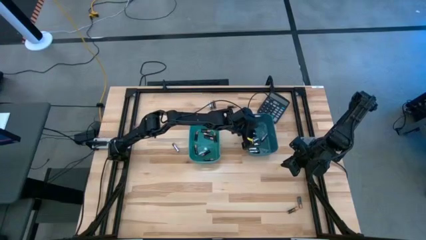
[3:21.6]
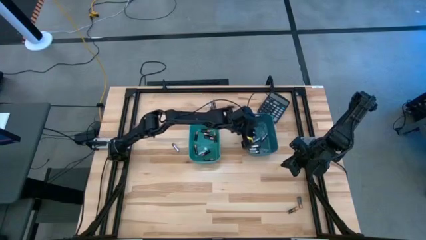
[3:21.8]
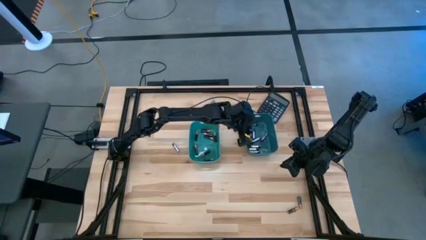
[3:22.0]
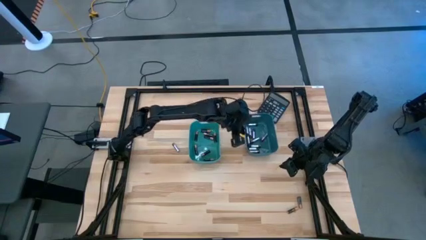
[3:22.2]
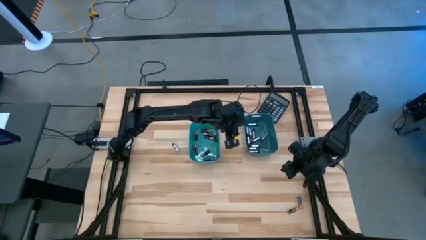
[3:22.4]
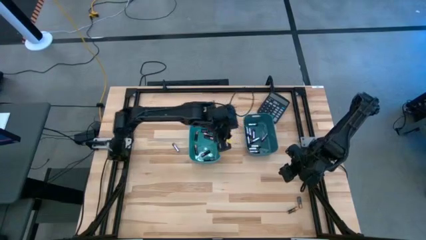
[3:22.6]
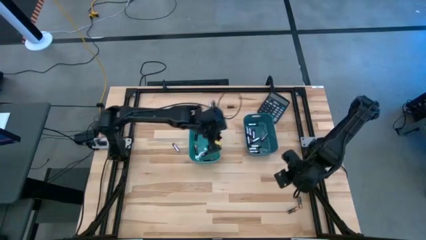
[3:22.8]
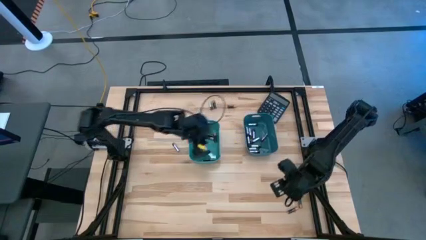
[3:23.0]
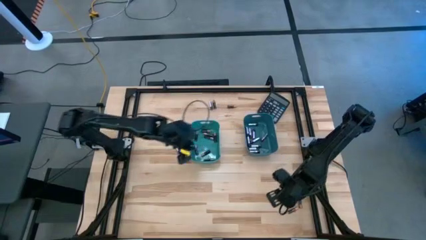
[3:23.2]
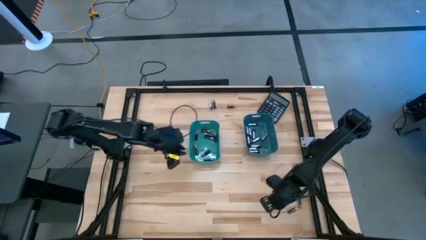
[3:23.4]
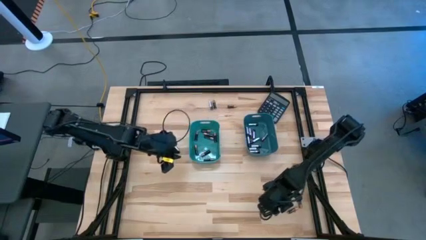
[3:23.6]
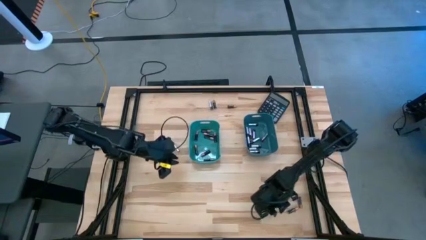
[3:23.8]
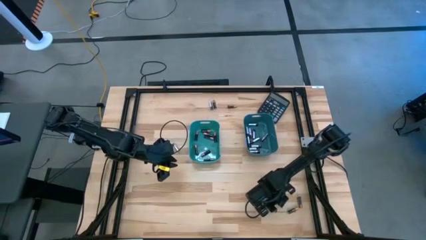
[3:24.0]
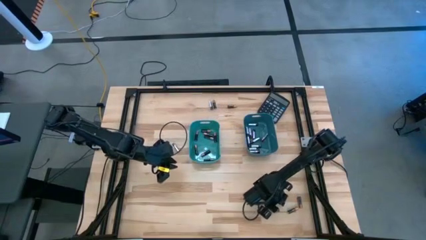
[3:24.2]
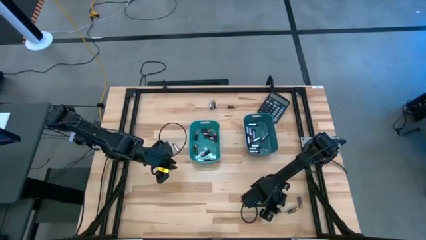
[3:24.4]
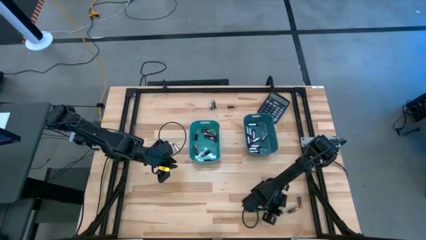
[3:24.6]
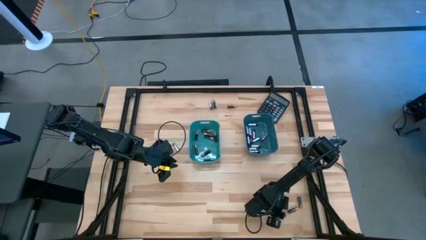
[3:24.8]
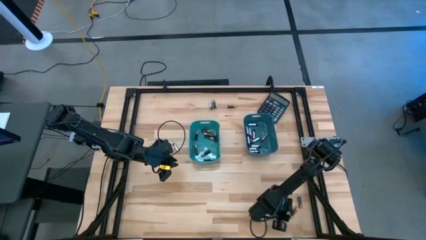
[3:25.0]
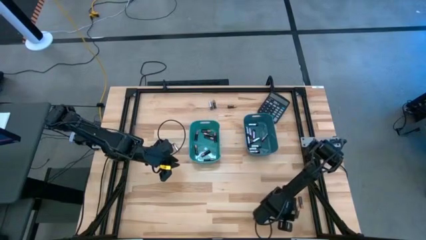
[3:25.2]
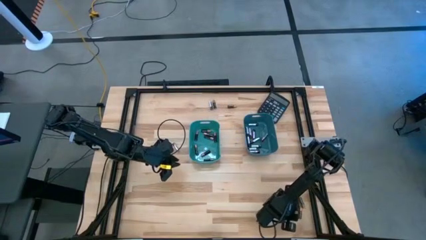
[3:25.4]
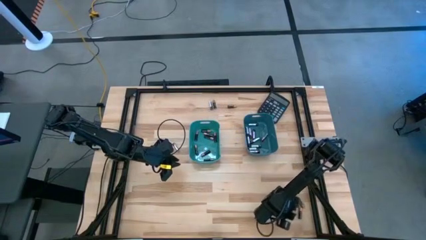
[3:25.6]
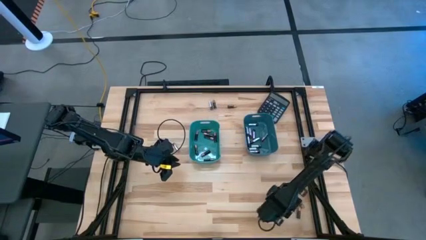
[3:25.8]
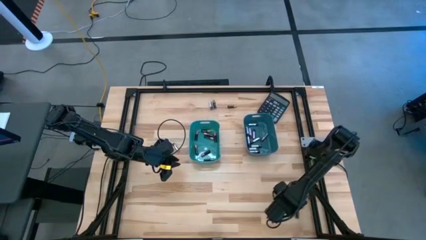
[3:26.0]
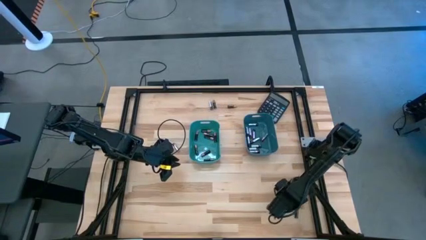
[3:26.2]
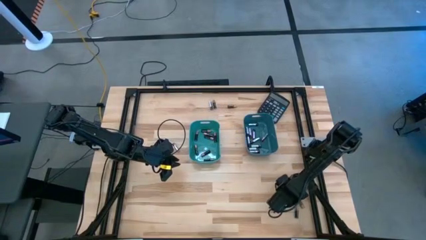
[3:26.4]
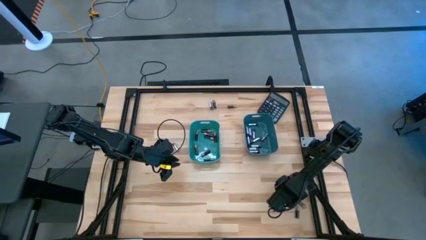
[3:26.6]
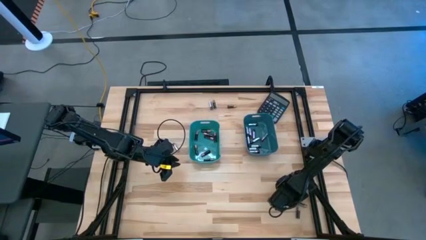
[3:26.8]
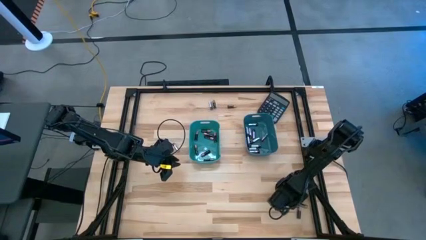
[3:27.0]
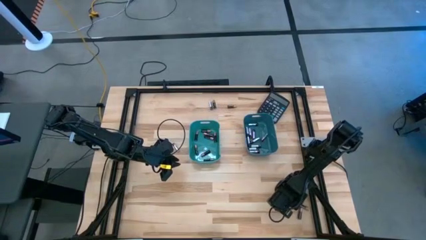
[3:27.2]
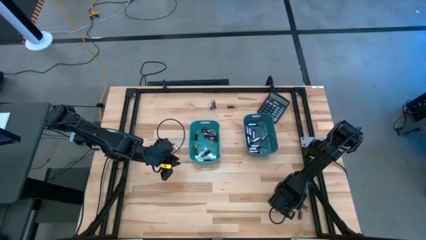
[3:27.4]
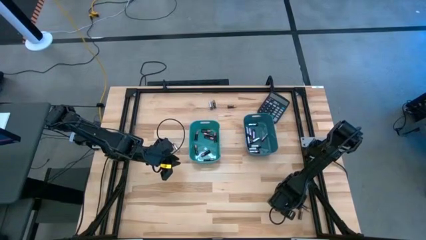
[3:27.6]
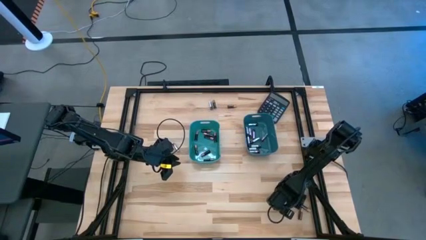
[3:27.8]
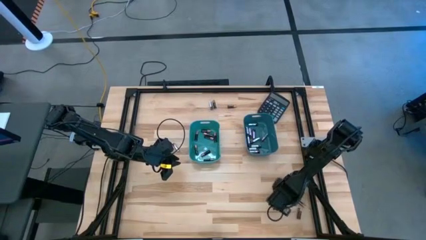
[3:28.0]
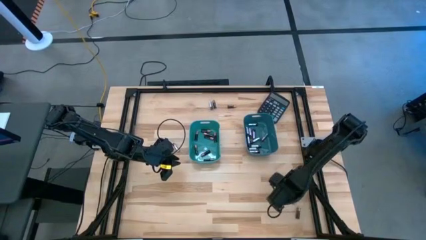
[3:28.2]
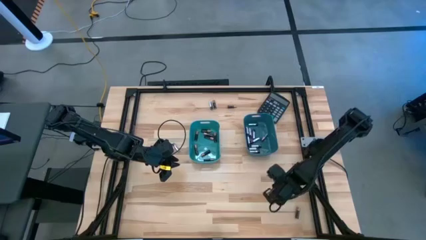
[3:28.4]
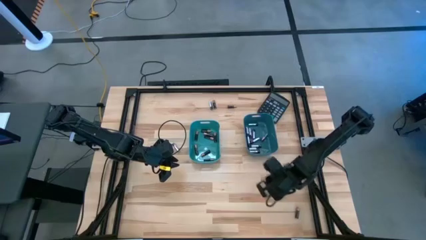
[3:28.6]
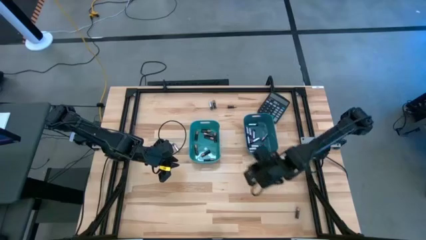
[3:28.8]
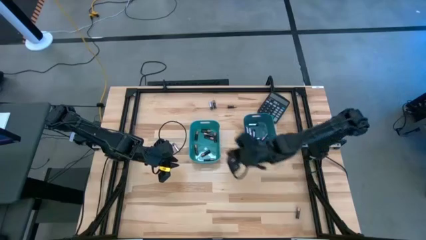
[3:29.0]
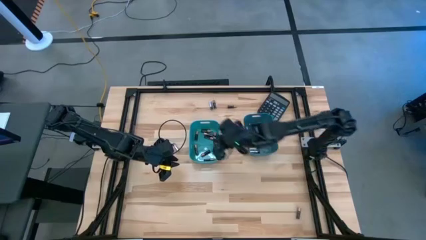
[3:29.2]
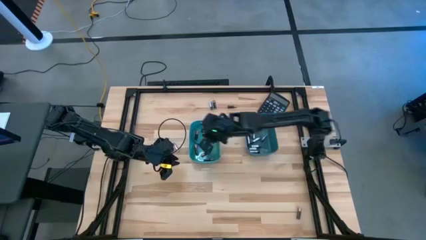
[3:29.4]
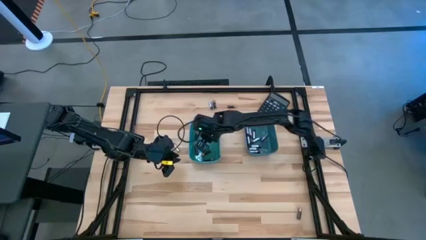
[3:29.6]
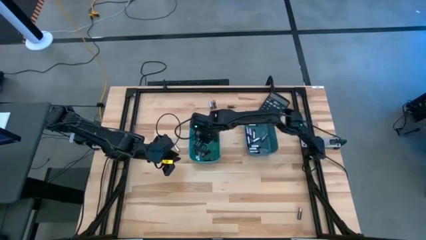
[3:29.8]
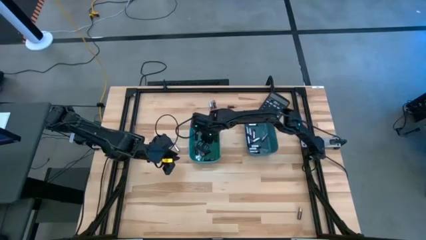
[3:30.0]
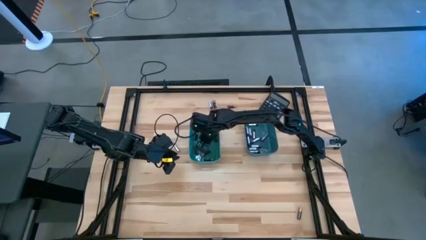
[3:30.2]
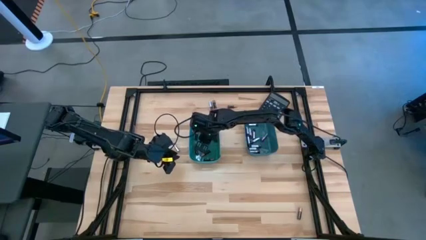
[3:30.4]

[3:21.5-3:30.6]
Task: Sort batteries
Put the black battery into the green bin

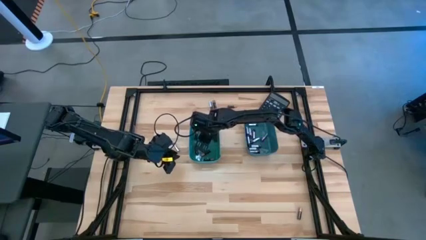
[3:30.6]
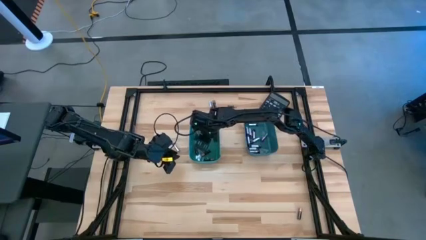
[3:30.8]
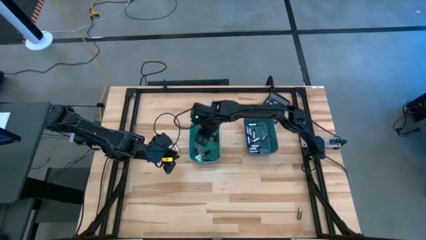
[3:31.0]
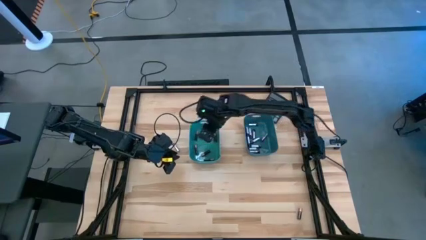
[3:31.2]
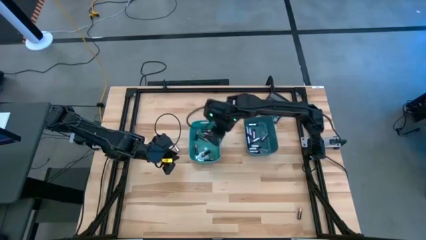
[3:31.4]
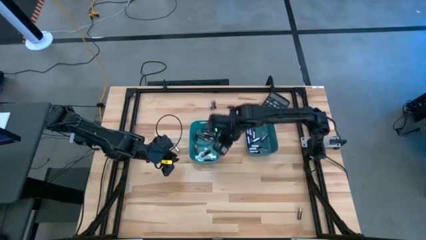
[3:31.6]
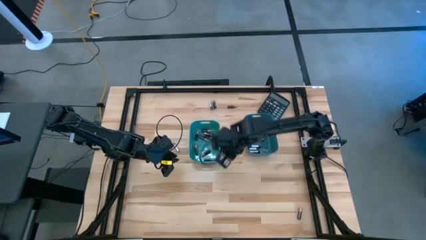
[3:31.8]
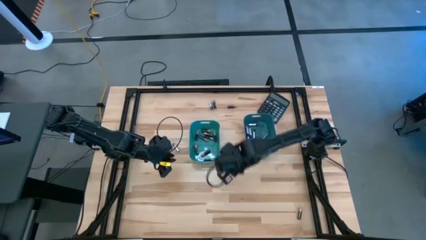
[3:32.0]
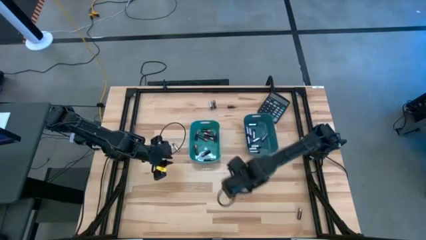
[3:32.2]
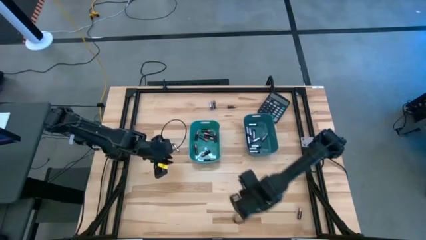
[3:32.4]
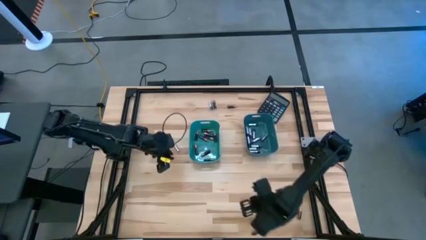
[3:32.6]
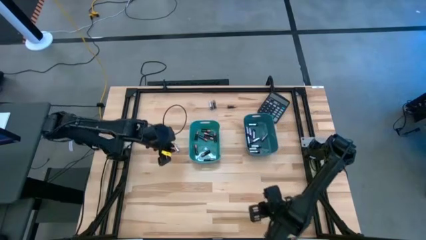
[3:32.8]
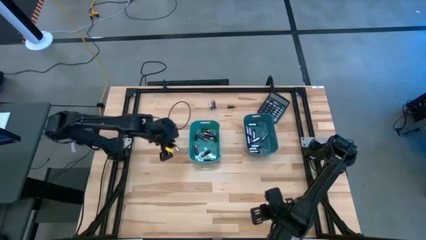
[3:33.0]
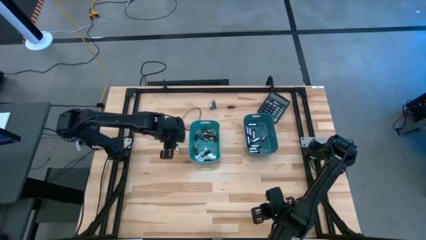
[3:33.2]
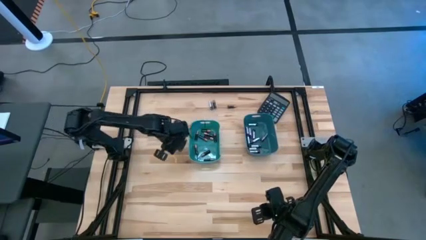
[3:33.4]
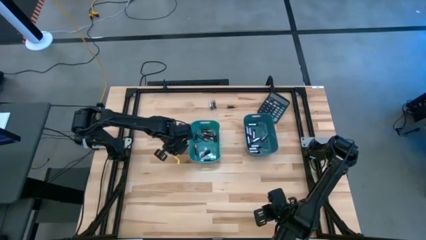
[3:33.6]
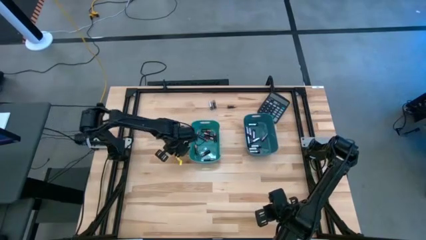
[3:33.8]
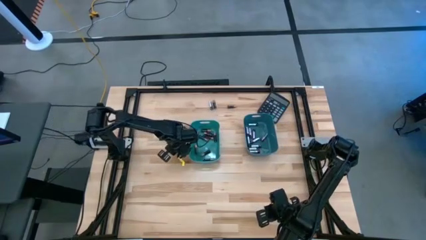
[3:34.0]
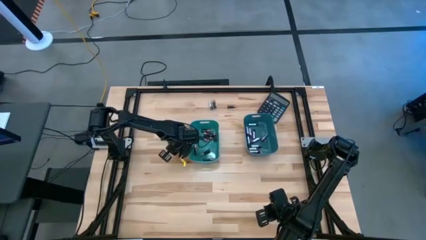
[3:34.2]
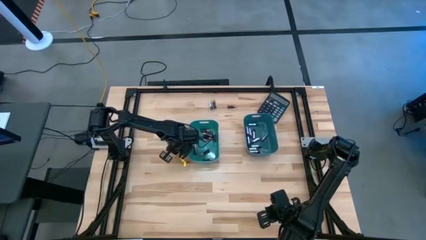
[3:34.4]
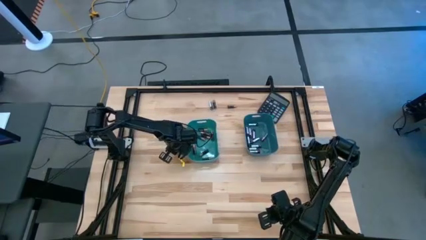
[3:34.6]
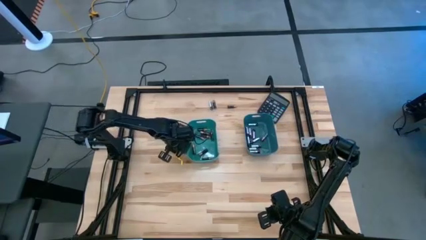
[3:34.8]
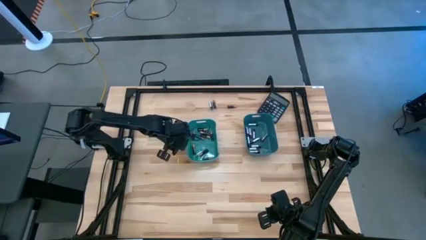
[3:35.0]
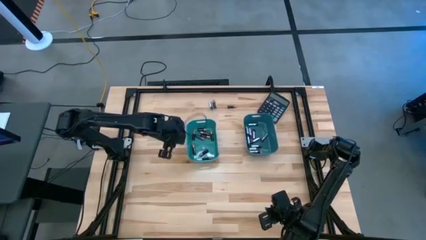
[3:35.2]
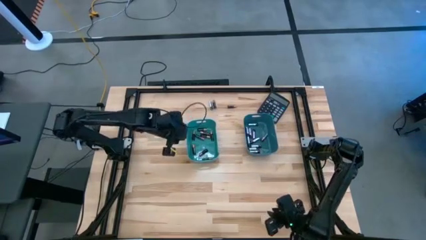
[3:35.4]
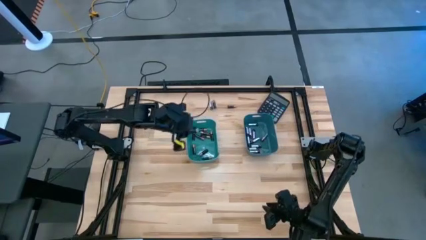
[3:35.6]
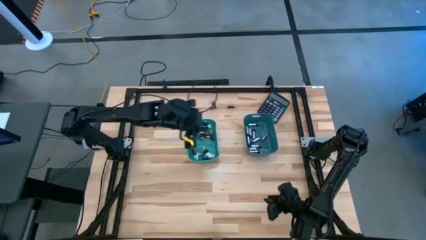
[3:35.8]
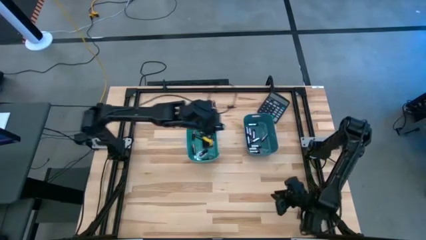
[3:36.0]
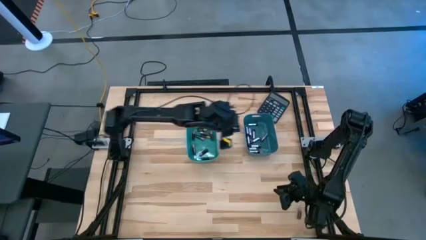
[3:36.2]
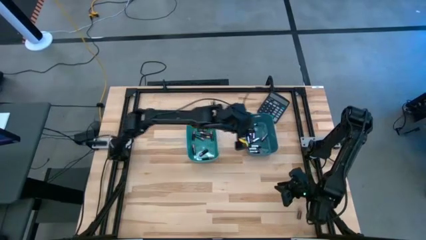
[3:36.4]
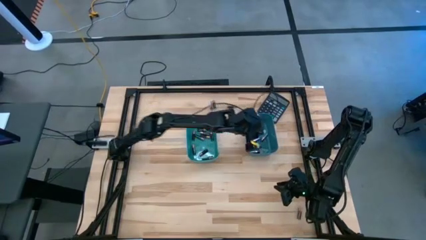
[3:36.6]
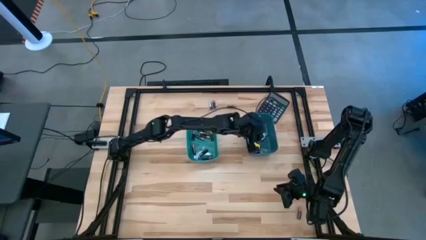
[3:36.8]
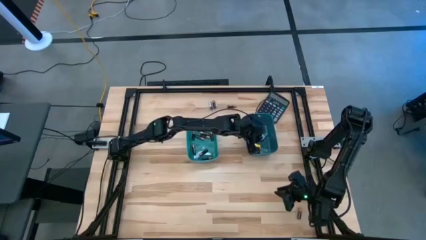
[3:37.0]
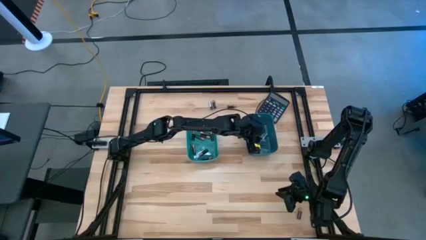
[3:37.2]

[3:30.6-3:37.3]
Put the silver battery into the blue bin
